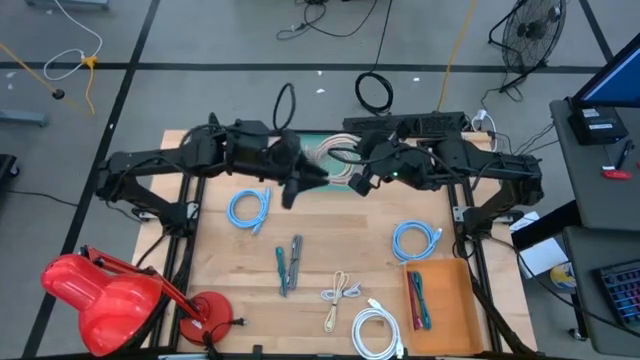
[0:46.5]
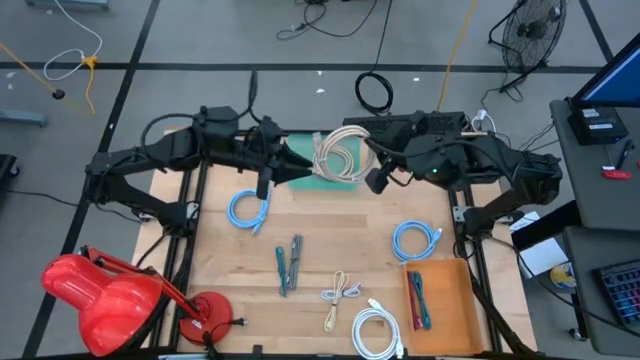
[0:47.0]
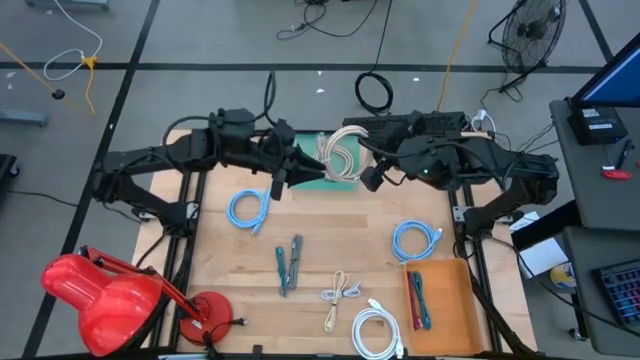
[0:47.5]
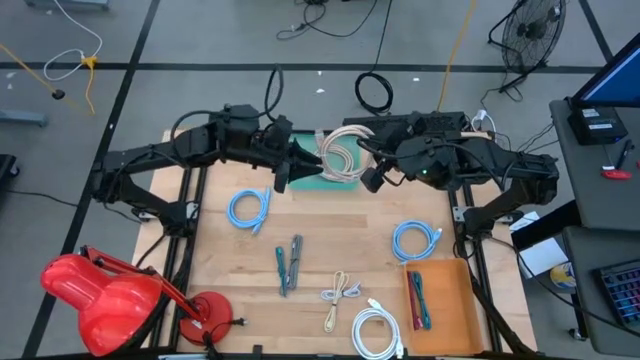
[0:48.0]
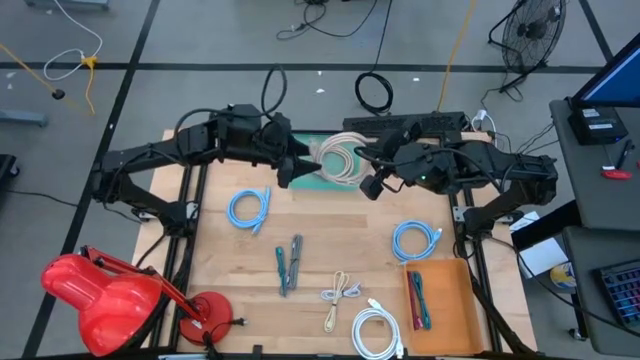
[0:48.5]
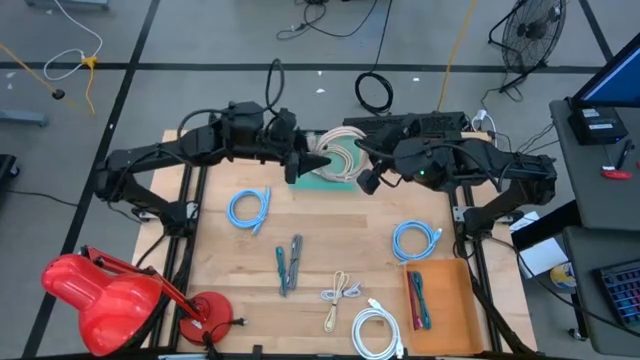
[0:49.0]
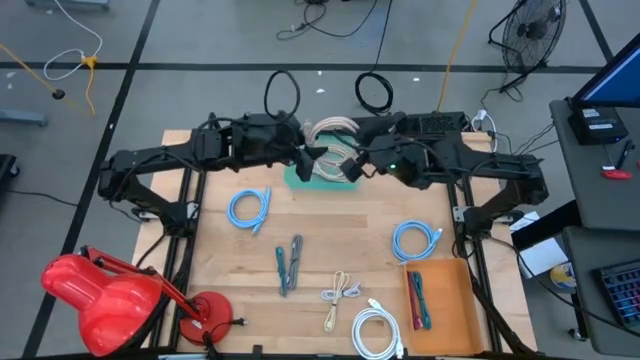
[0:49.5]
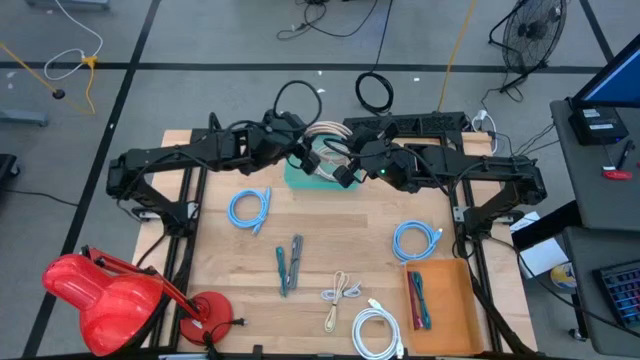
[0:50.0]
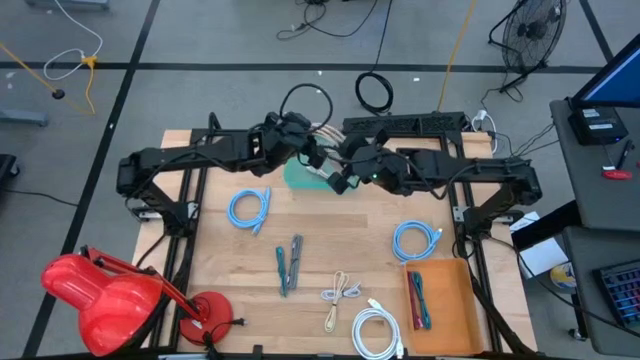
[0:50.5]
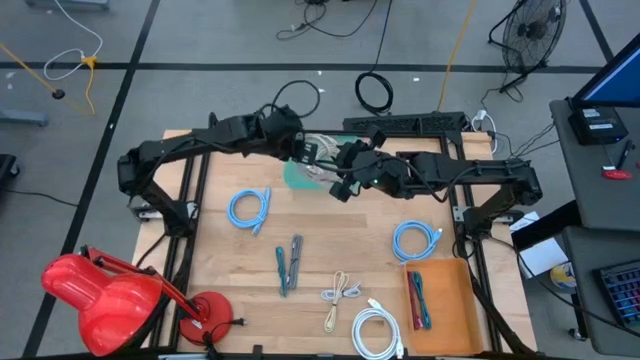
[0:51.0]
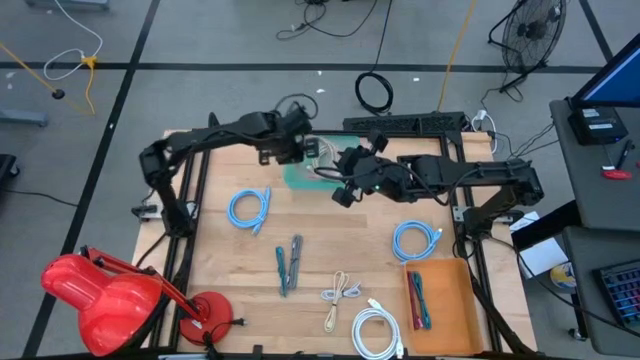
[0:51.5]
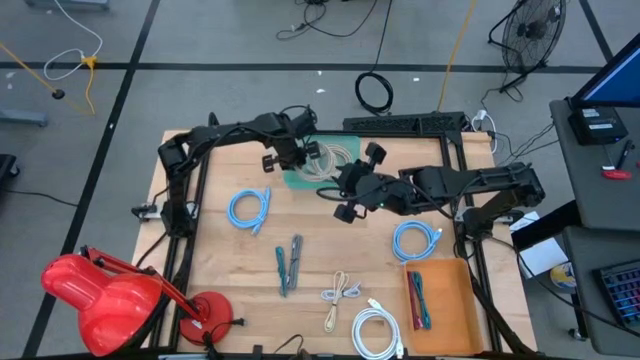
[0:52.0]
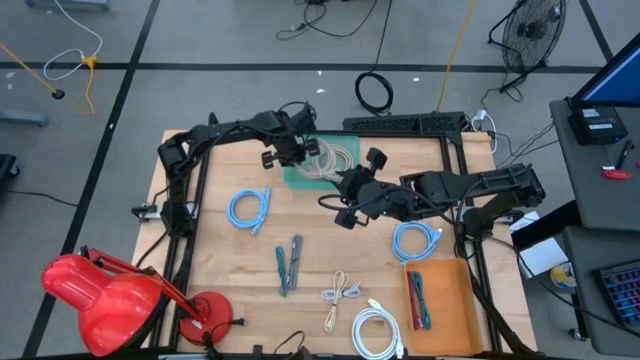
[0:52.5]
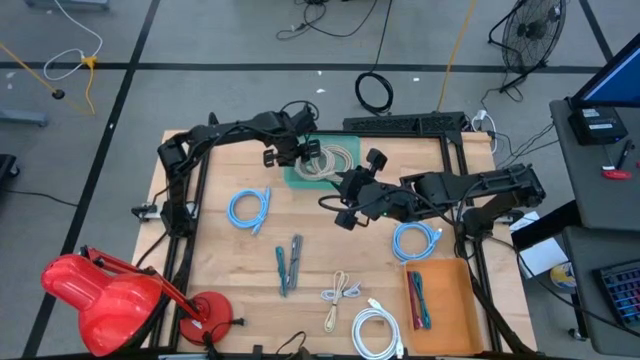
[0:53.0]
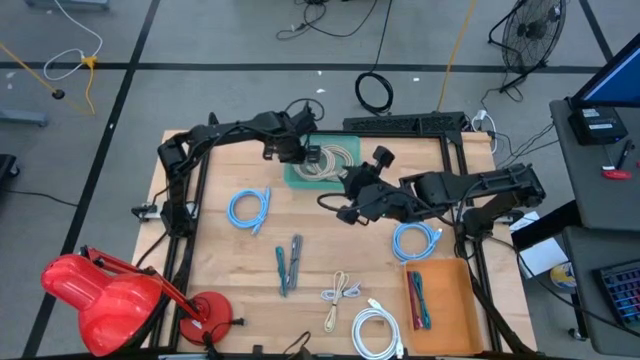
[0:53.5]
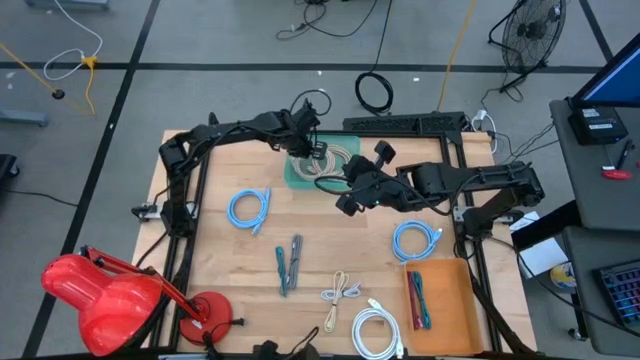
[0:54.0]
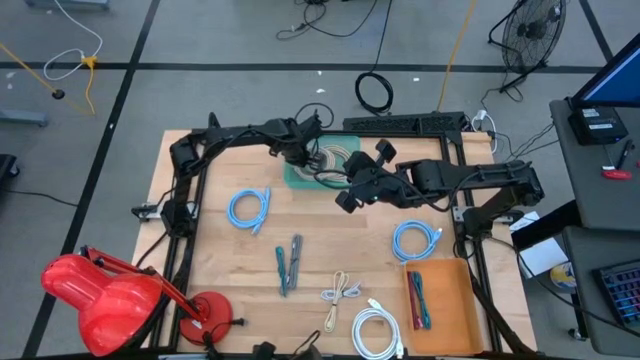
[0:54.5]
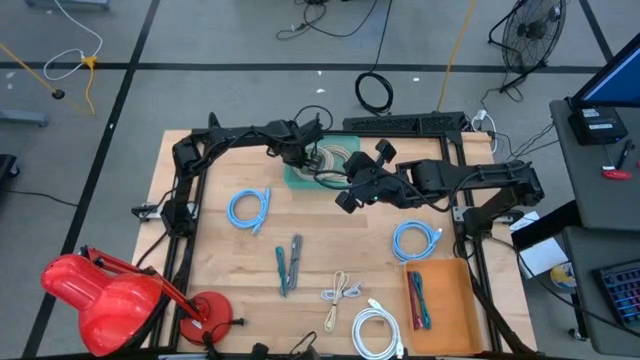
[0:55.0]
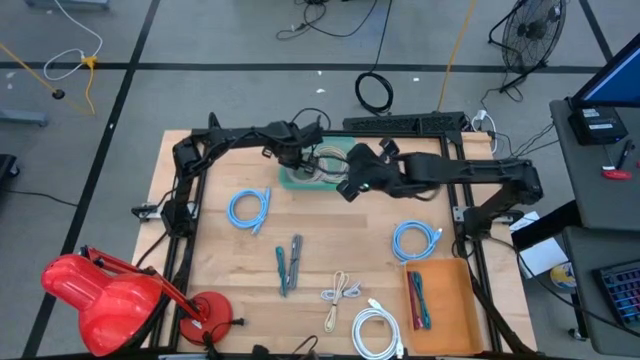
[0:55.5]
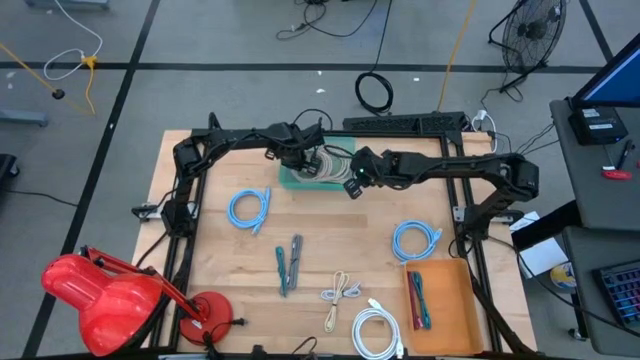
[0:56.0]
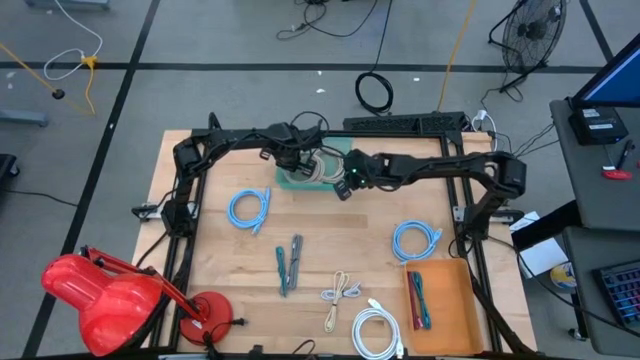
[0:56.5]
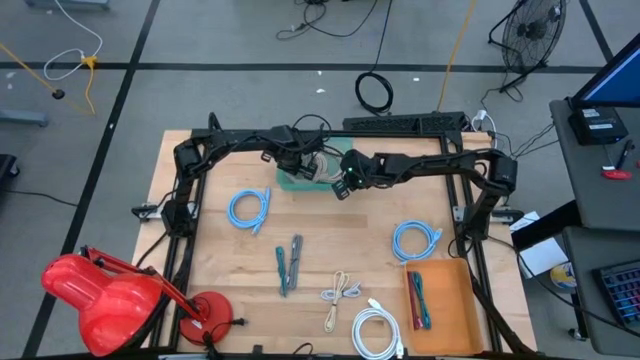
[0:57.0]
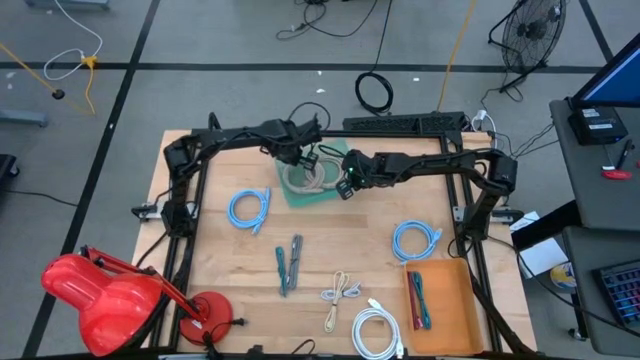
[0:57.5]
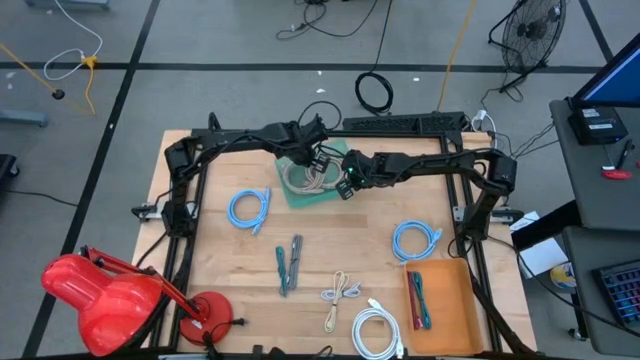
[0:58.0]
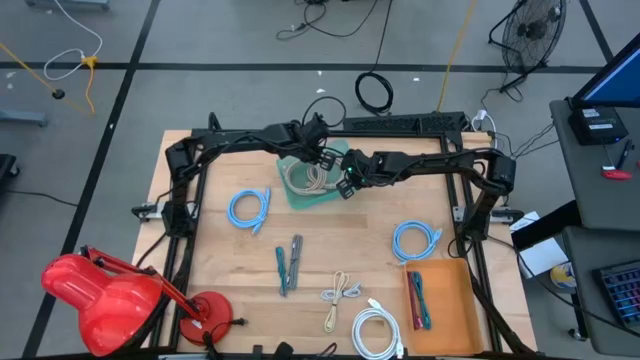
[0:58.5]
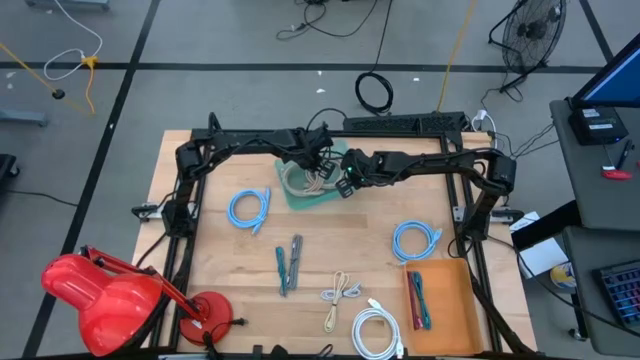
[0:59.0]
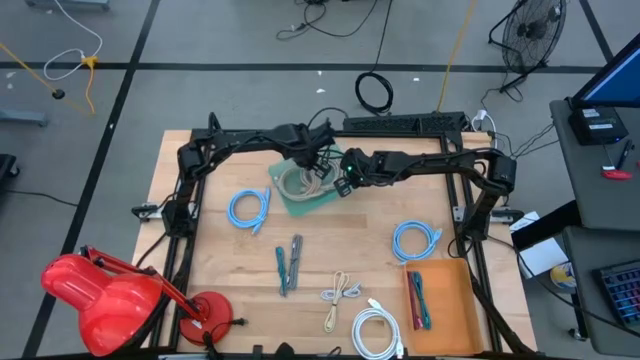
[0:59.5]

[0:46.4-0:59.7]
Task: Pick & Place USB Port
Put the brown display cable into the blue bin

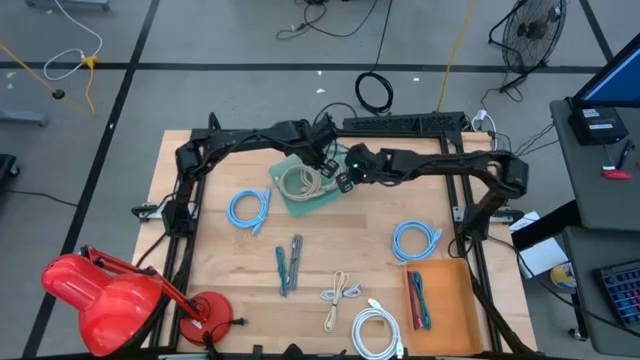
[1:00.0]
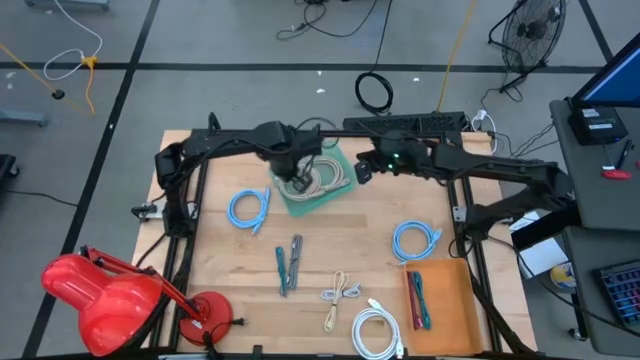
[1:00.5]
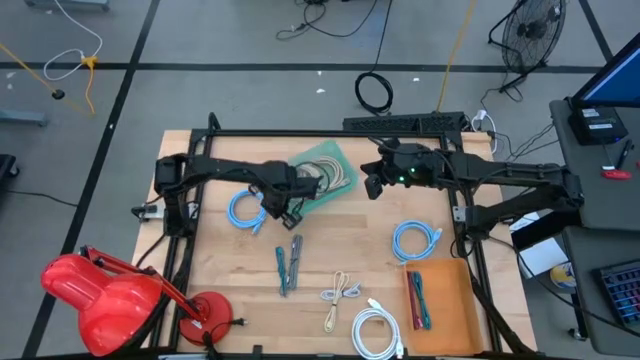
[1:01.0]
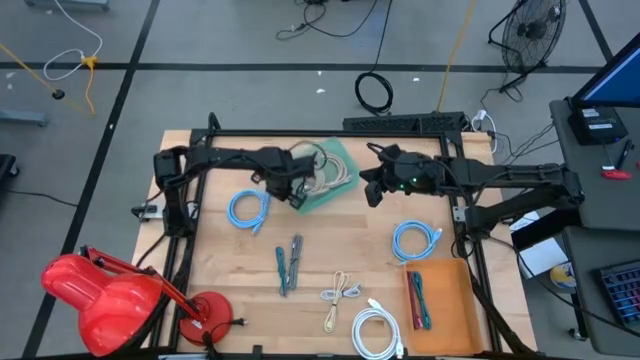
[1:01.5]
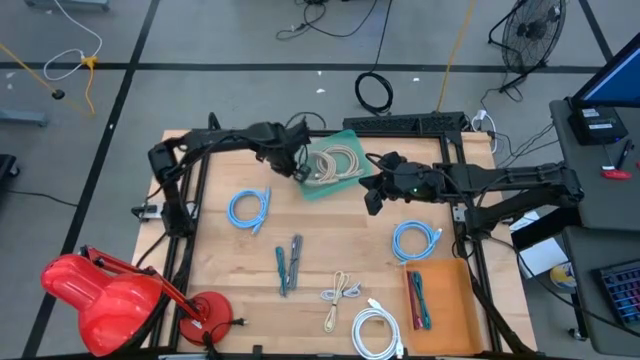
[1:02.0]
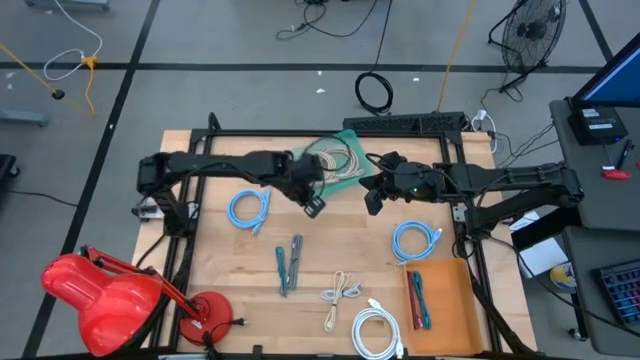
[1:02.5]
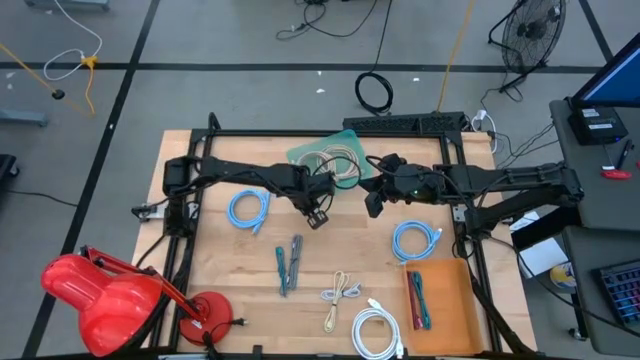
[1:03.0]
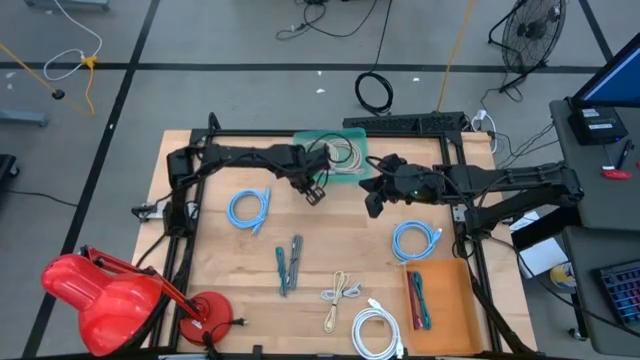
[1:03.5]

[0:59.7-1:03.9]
Adjust the blue bin on the table

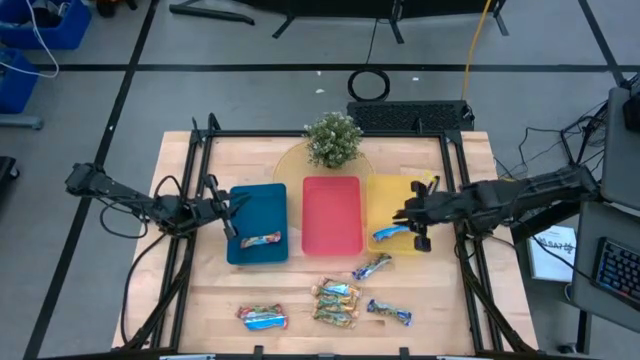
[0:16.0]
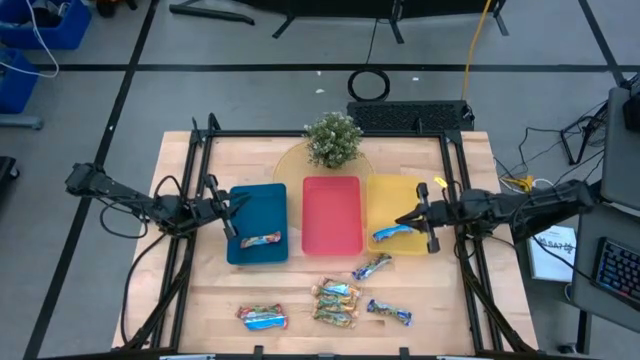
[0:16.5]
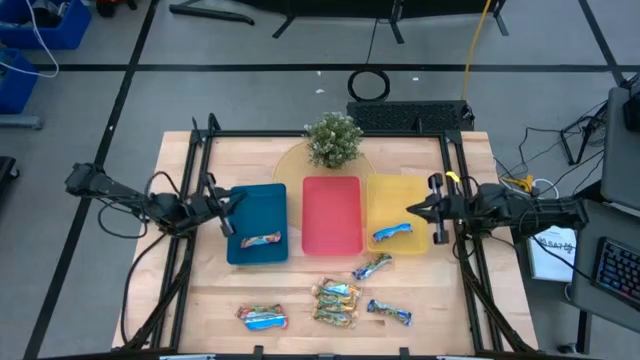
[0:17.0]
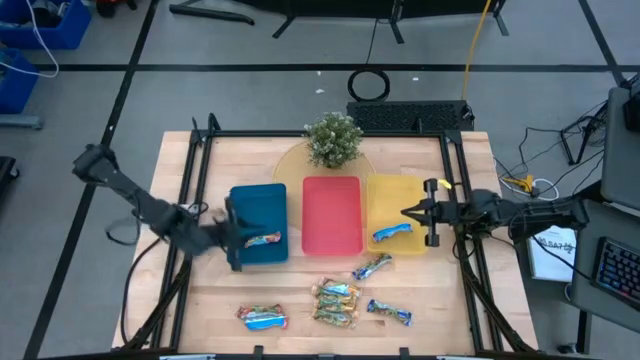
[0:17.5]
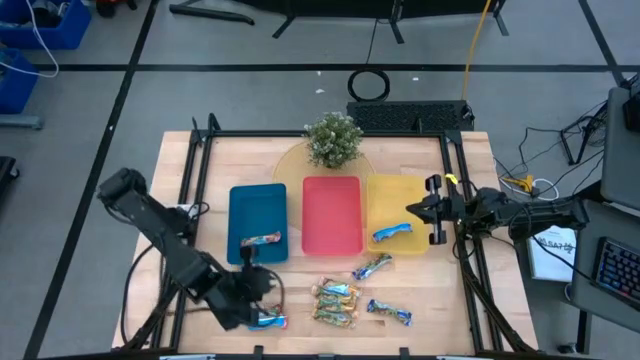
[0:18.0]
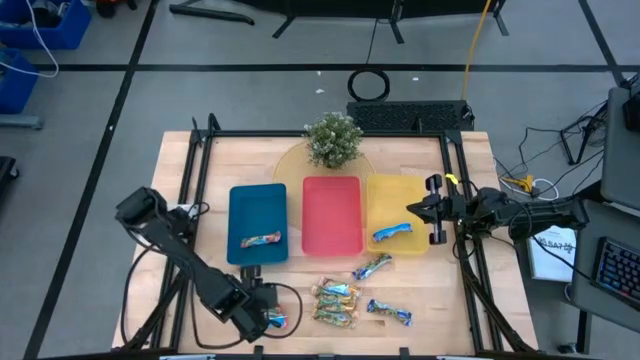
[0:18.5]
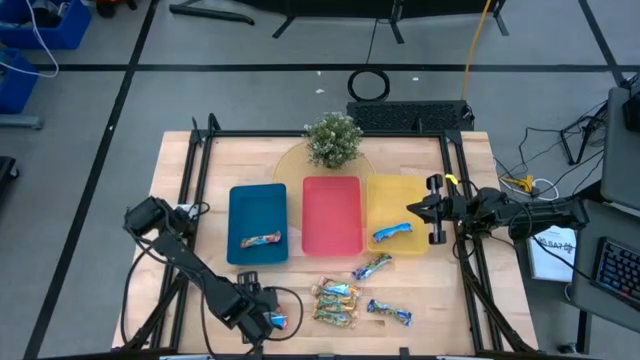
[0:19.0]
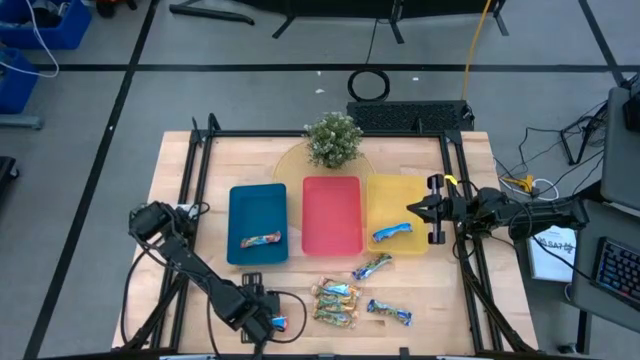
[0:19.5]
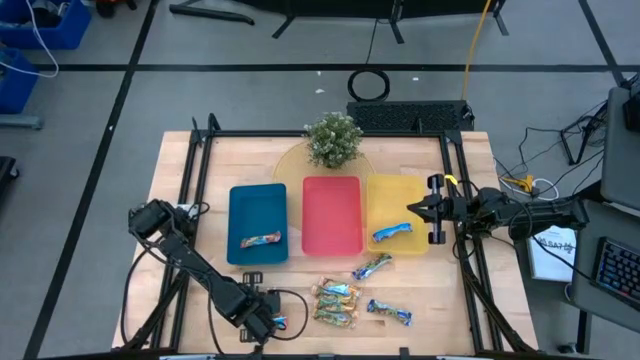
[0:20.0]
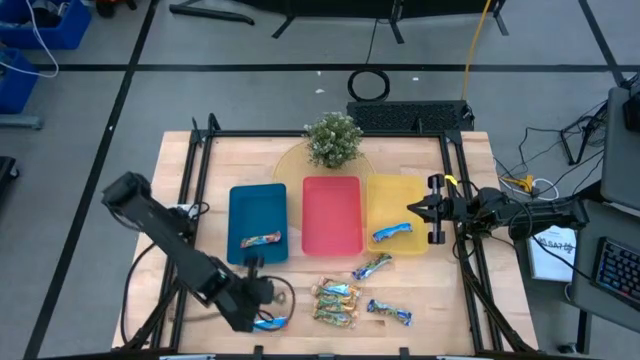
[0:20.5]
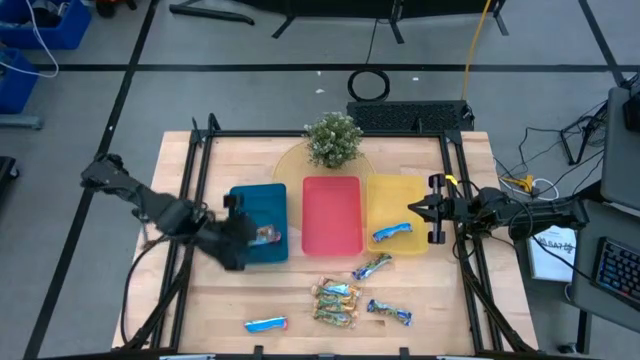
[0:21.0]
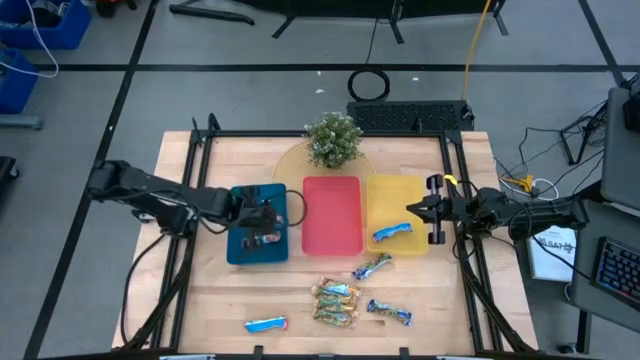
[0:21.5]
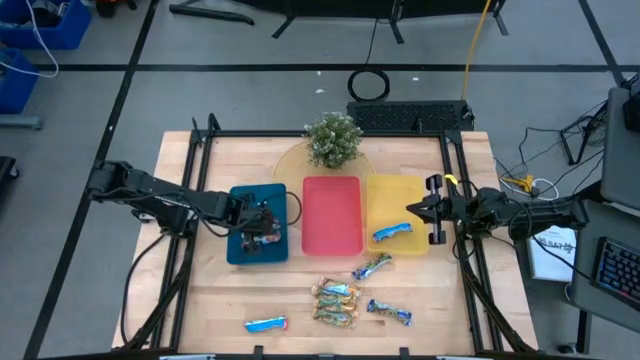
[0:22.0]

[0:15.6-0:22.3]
Task: Pick and place Granola Bars by type
Put the red granola bar into the blue bin
